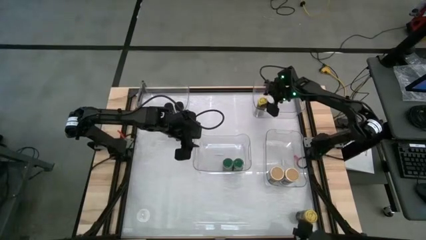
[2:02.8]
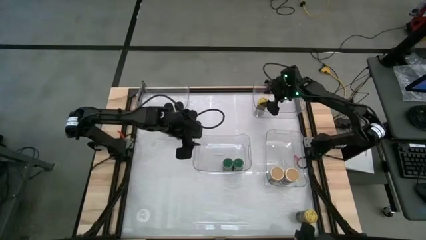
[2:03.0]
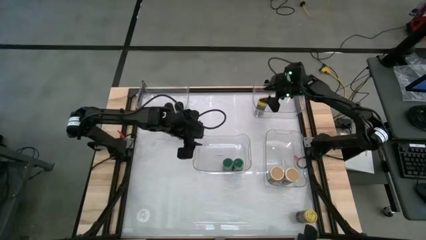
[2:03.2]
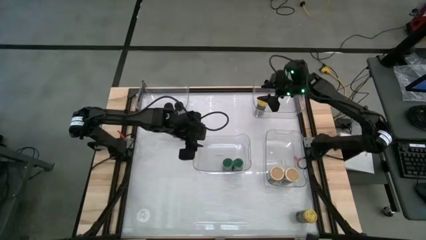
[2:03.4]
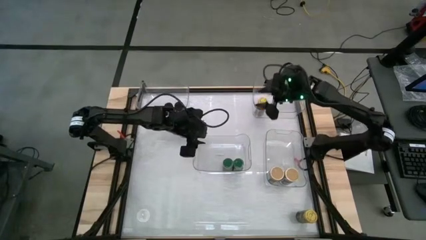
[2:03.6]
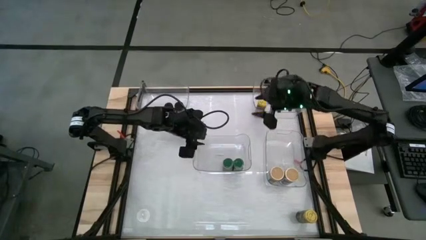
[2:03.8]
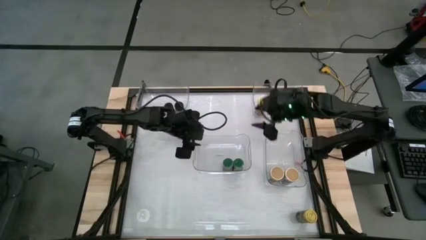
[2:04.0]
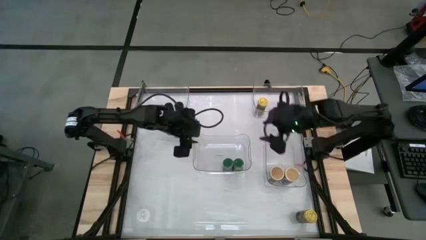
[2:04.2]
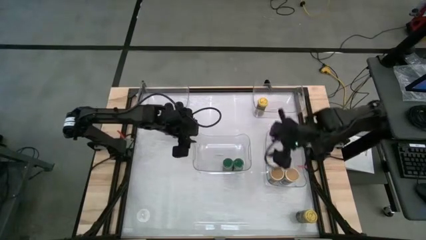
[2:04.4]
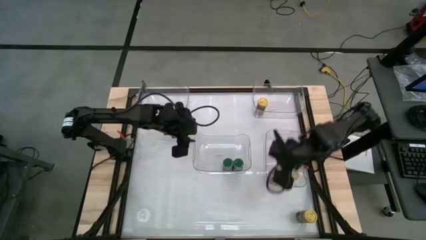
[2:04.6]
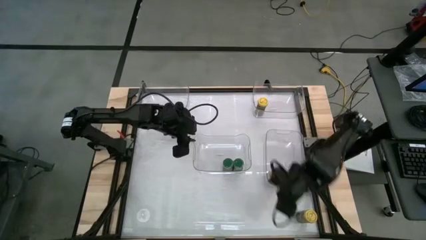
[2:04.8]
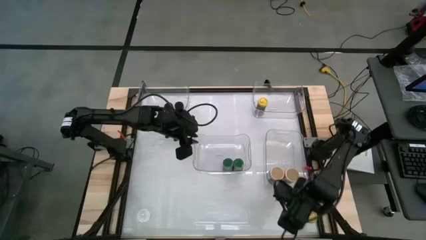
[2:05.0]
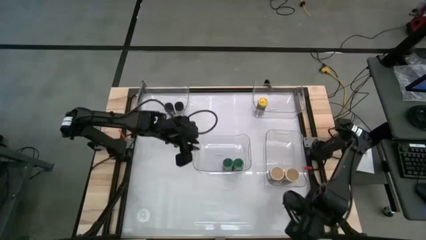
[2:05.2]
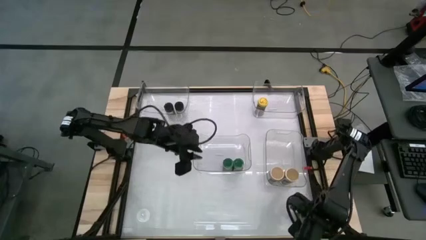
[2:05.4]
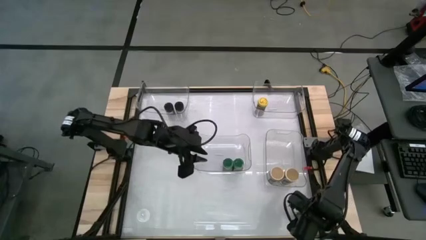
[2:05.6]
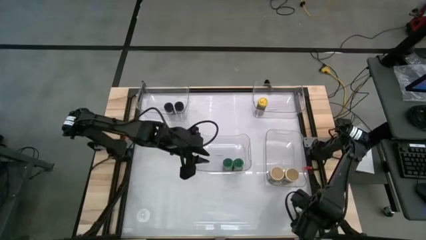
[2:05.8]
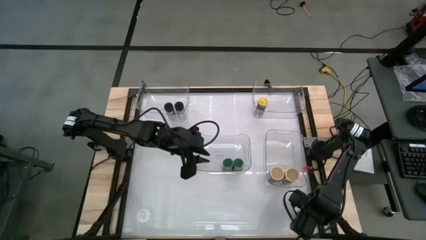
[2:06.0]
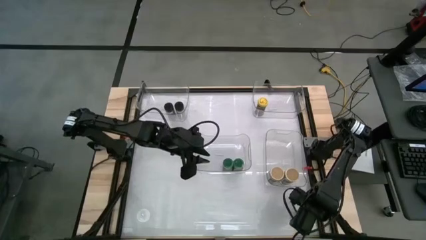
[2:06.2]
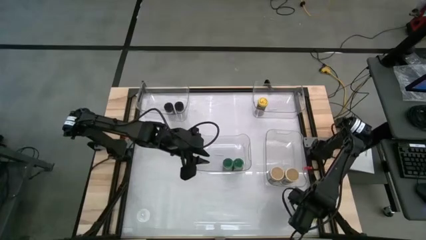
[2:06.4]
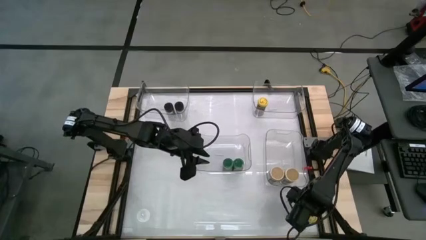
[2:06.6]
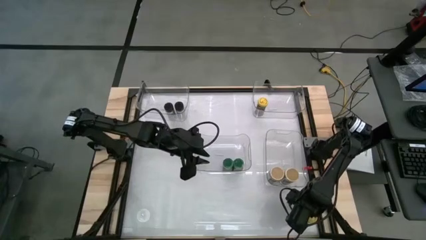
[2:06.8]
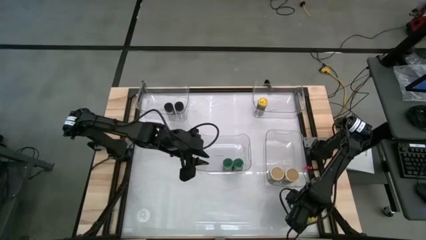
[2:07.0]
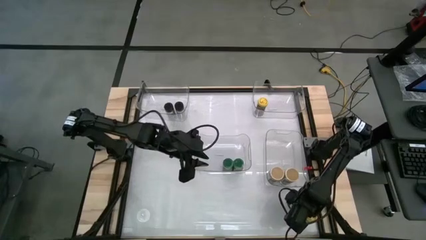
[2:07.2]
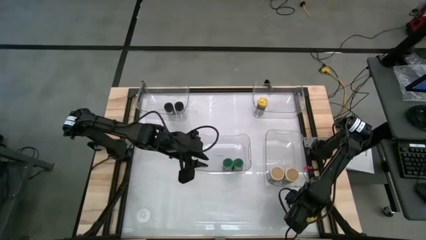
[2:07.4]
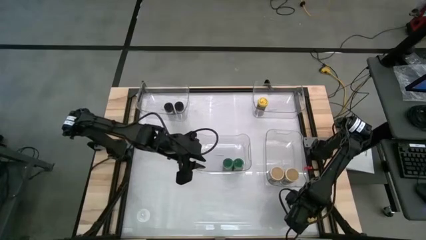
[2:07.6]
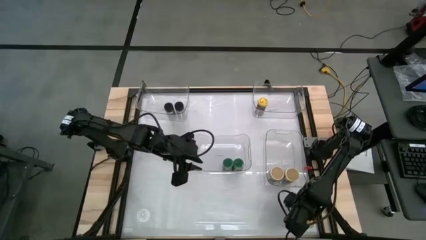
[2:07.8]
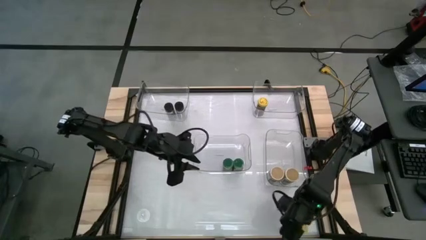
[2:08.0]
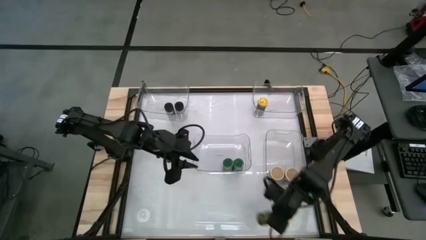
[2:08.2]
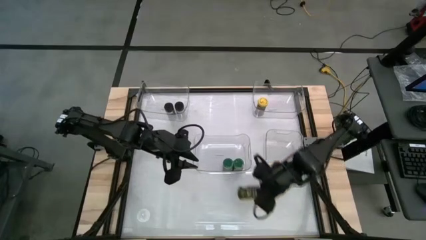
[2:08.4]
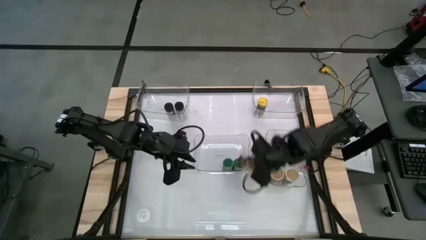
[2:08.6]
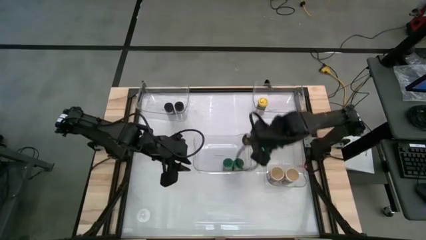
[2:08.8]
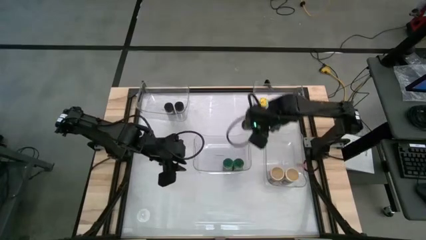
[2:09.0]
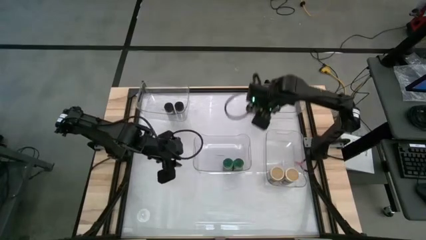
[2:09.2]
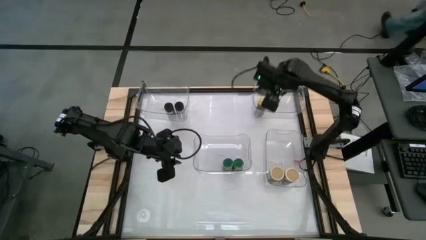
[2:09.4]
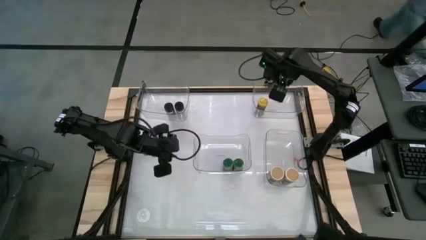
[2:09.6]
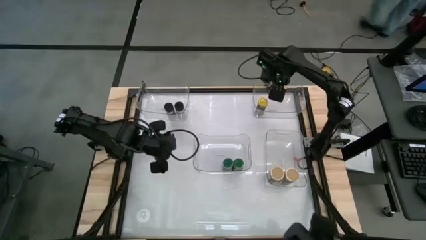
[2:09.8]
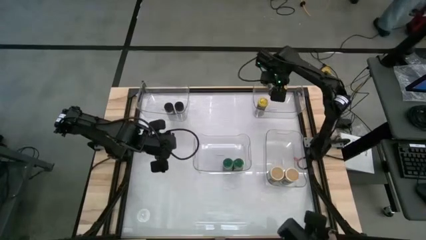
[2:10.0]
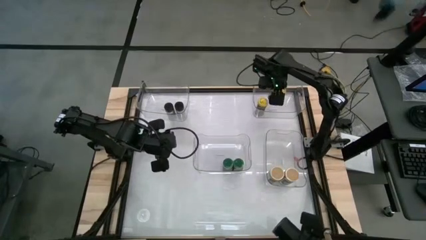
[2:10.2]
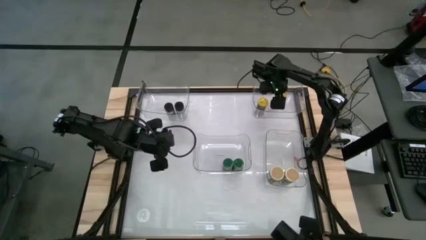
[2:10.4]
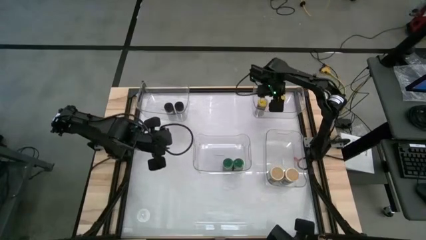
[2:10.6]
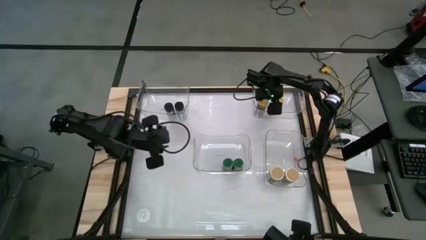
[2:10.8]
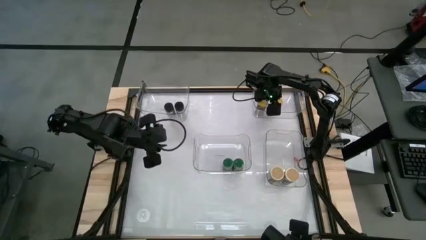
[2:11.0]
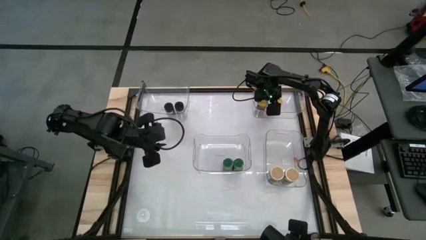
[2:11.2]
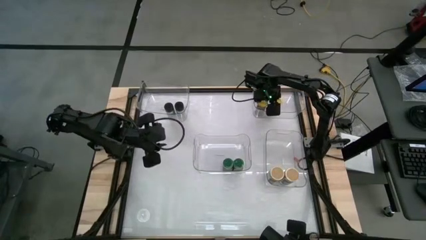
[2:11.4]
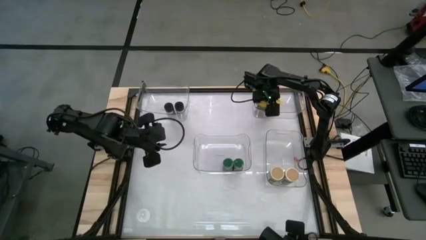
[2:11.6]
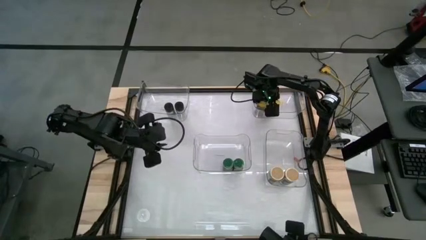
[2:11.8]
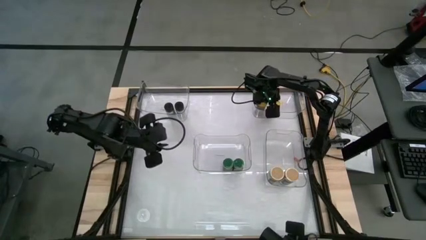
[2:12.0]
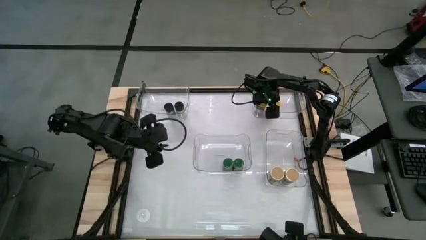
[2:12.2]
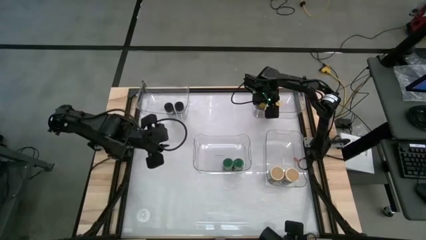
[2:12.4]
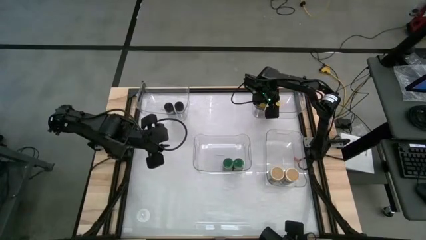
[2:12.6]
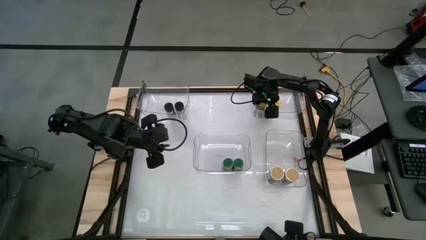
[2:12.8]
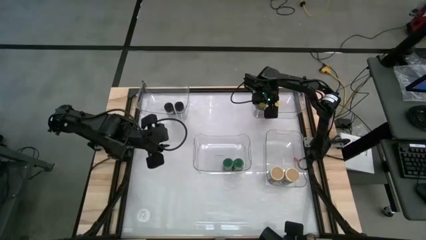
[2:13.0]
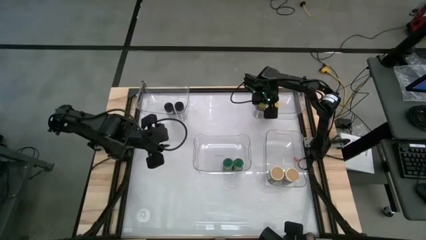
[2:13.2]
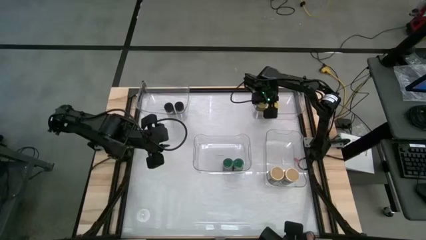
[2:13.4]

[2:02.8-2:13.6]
Task: Sort spices by type
Put the yellow seasoning bottle into the top right transparent bin

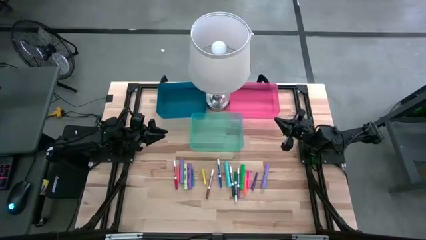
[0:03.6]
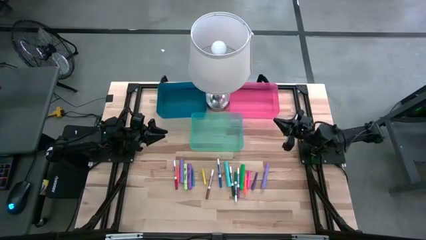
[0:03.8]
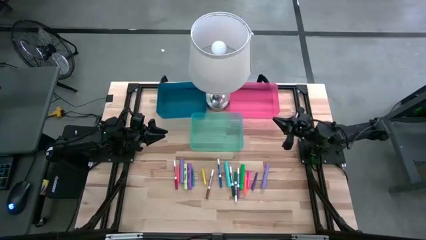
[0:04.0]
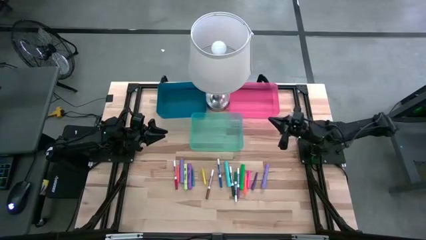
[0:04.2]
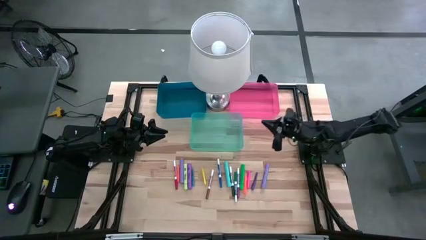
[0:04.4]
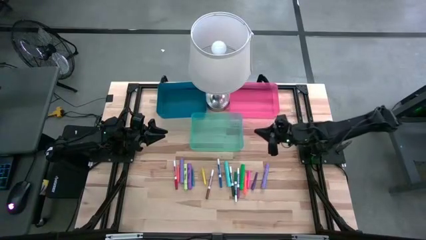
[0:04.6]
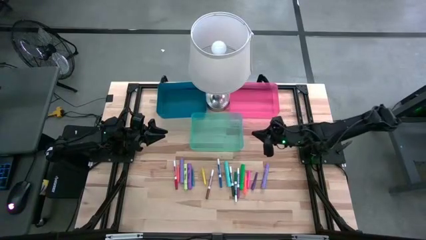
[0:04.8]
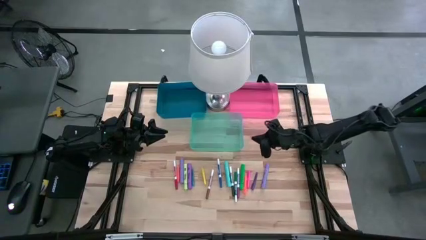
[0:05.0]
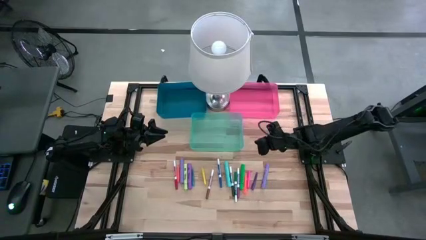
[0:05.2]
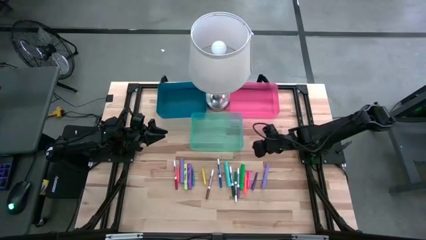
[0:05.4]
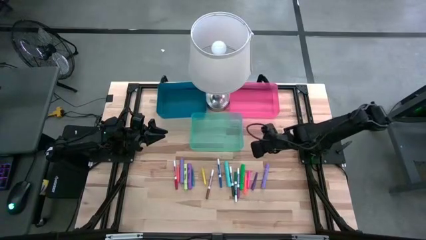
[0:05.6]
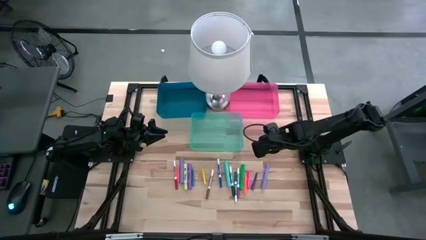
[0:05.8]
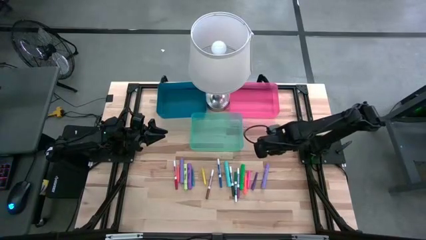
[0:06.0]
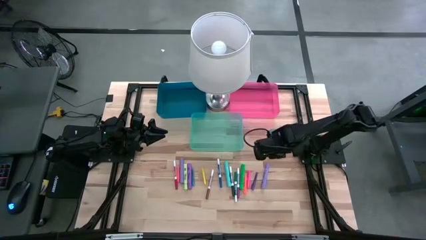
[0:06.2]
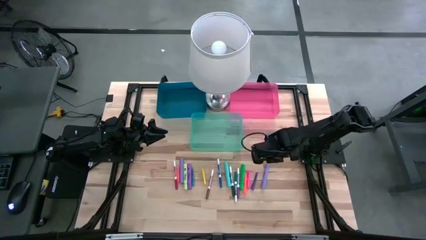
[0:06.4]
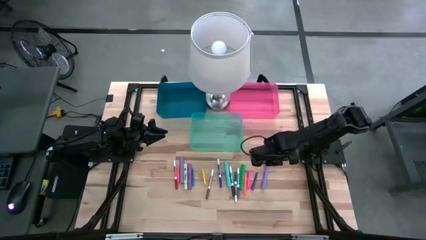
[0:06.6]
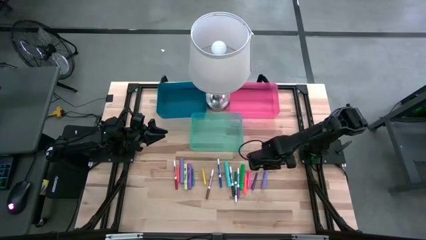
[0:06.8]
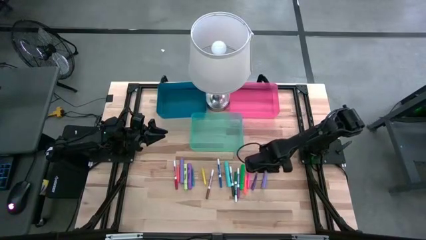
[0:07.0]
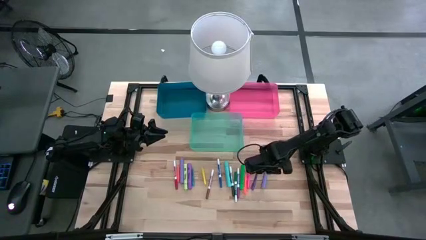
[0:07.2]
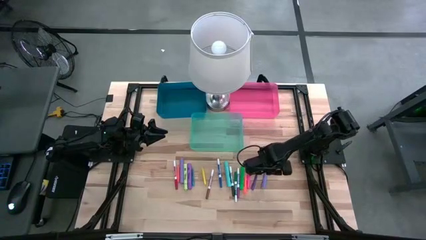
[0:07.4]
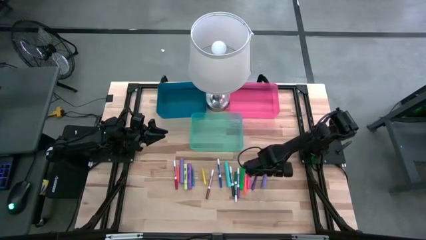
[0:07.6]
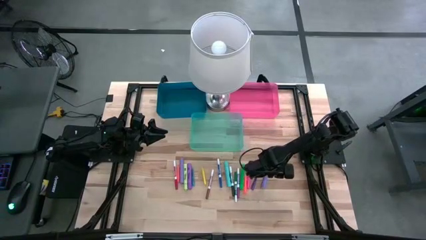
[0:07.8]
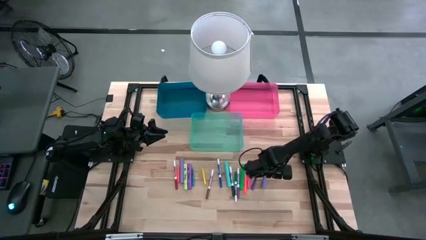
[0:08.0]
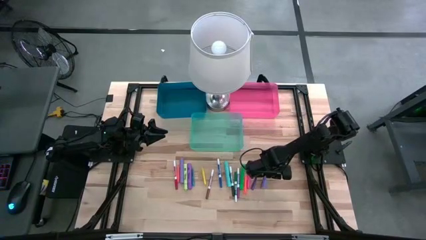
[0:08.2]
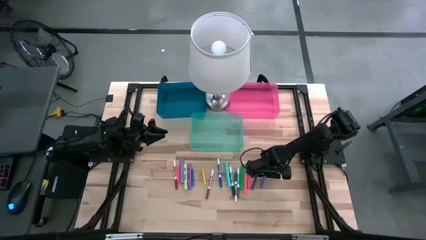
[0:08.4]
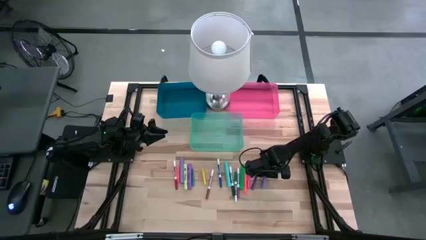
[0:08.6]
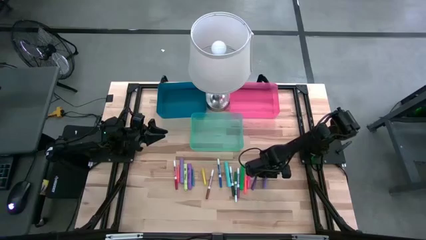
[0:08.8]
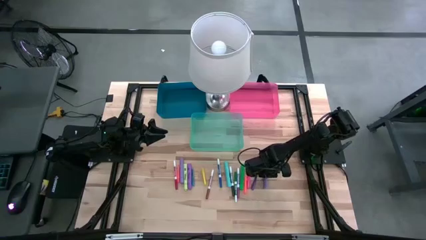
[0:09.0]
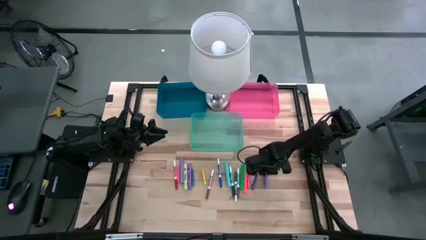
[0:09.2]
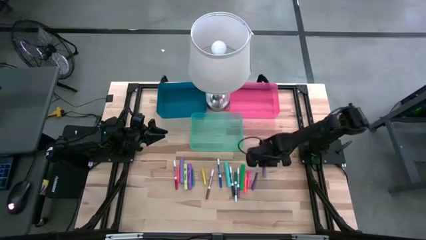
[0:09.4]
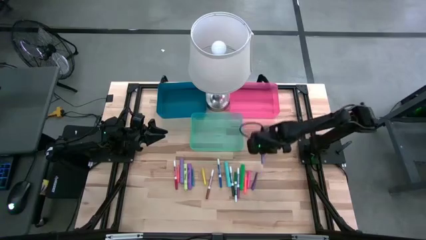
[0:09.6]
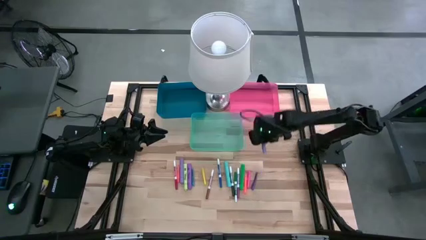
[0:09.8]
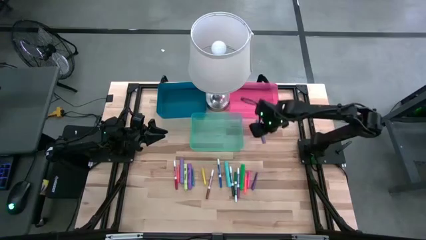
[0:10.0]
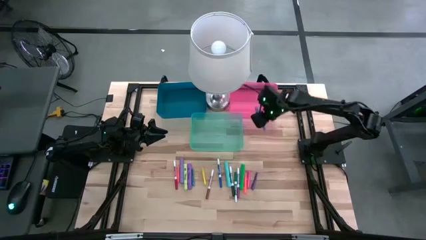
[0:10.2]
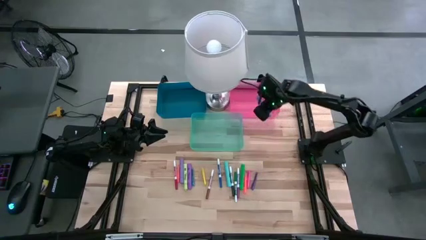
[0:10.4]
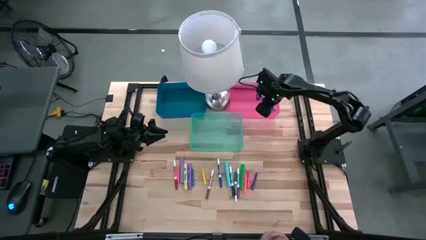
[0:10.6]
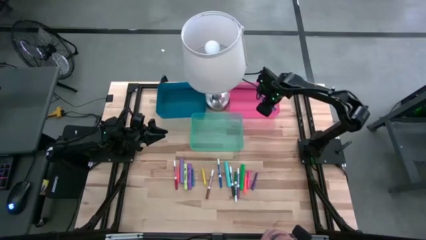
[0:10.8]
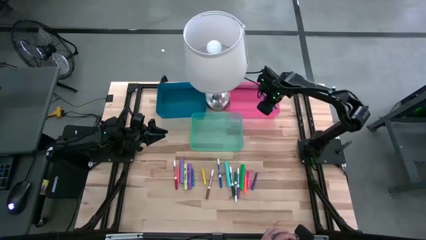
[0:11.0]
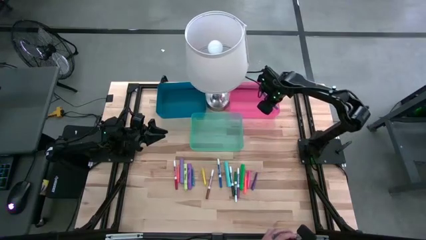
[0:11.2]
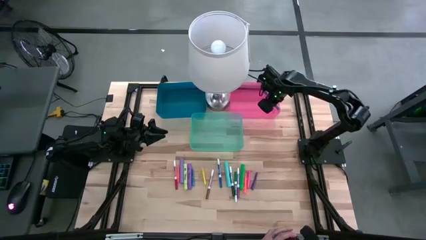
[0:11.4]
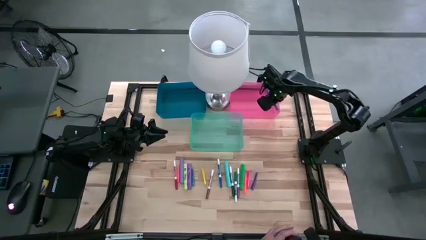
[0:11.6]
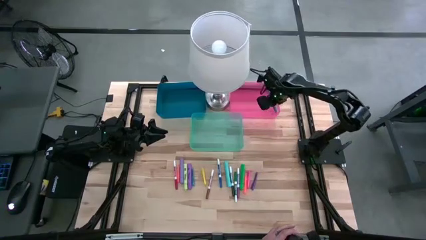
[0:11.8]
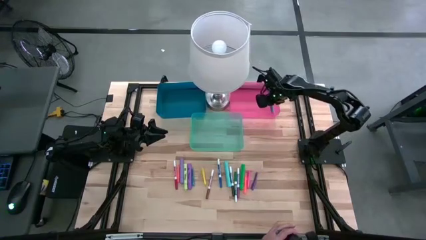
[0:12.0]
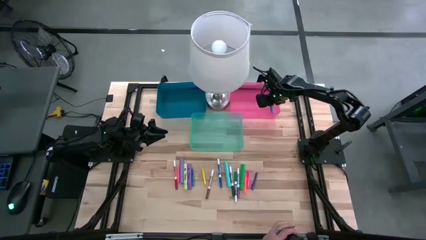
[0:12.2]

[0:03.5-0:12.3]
Task: Pick & Place Markers
Put the right violet highlighter pen into the red bin
